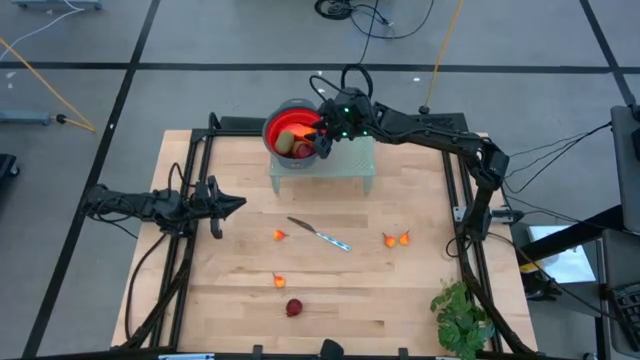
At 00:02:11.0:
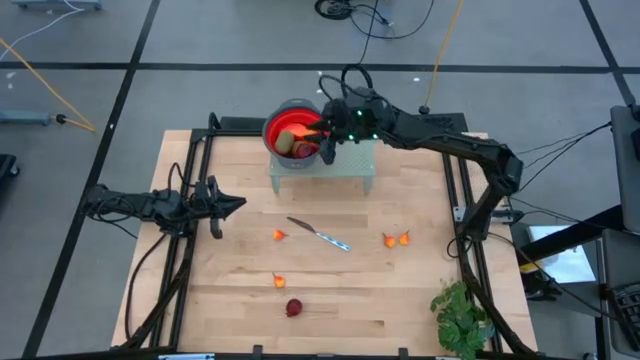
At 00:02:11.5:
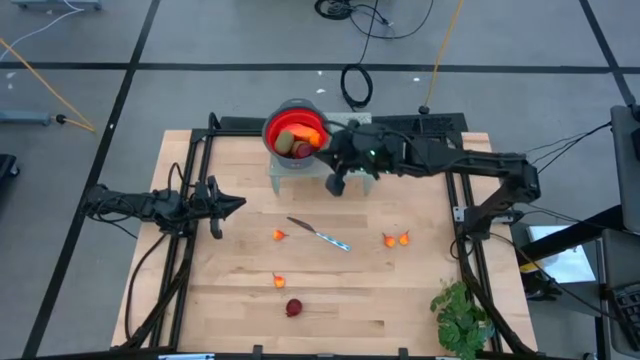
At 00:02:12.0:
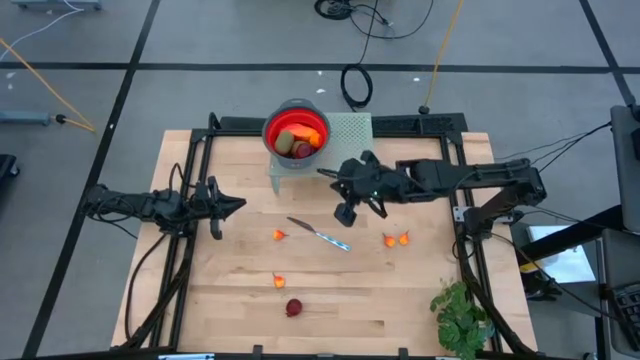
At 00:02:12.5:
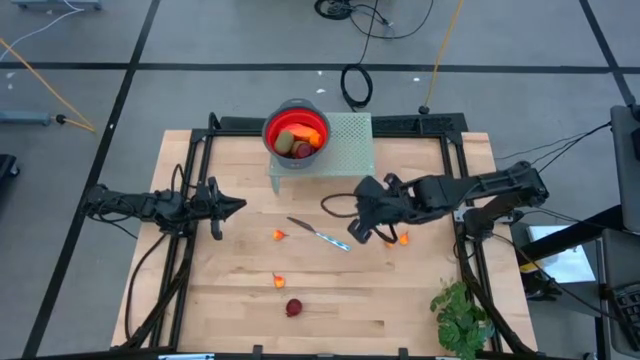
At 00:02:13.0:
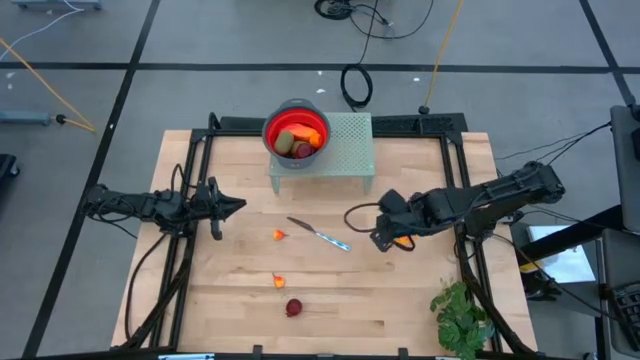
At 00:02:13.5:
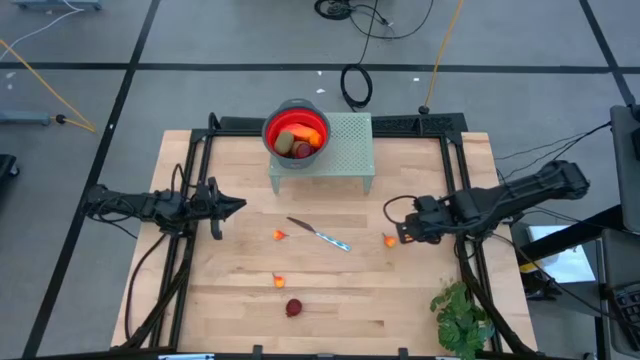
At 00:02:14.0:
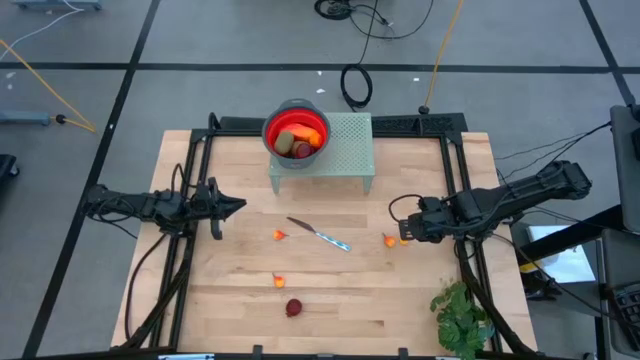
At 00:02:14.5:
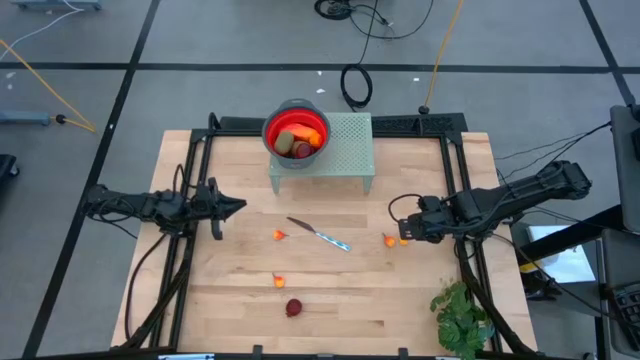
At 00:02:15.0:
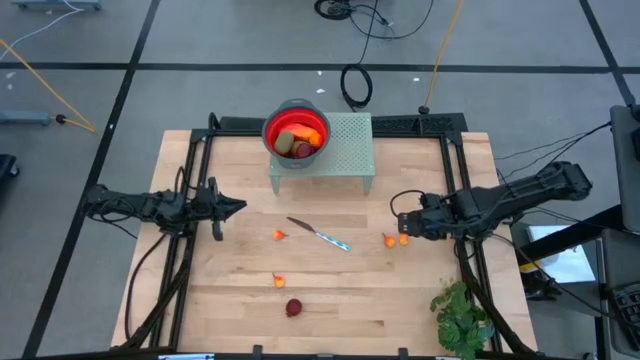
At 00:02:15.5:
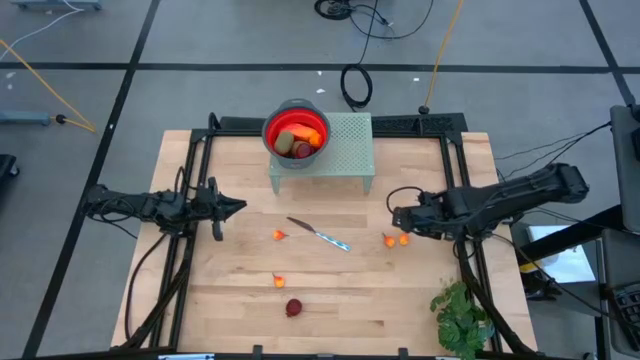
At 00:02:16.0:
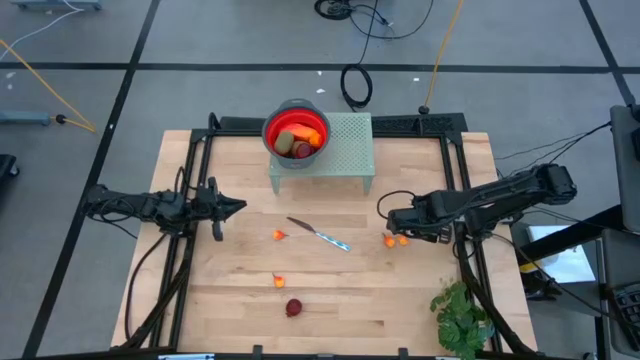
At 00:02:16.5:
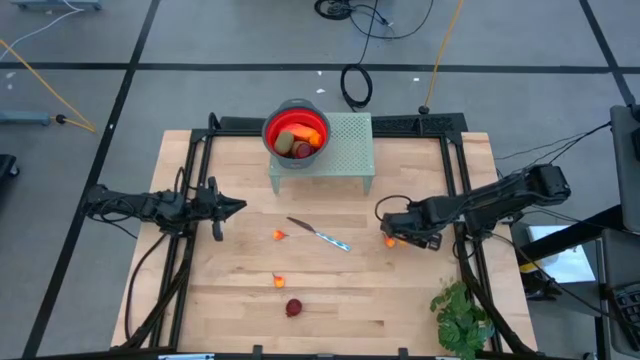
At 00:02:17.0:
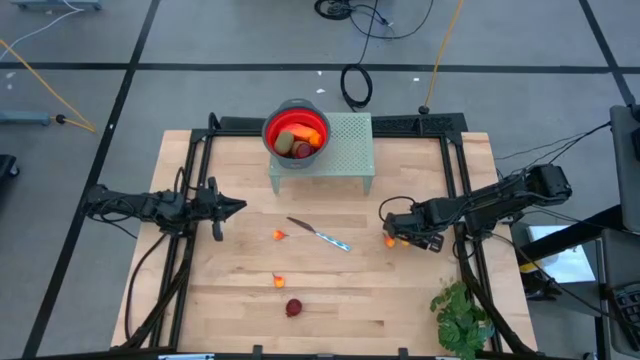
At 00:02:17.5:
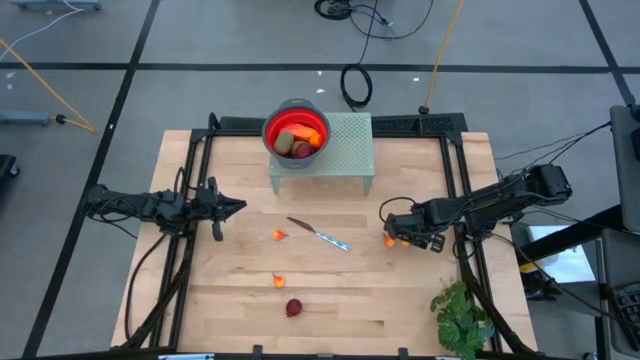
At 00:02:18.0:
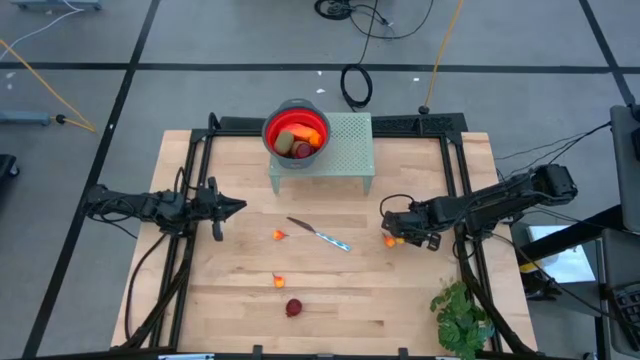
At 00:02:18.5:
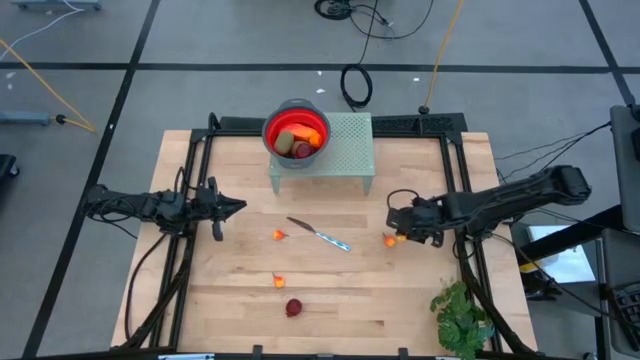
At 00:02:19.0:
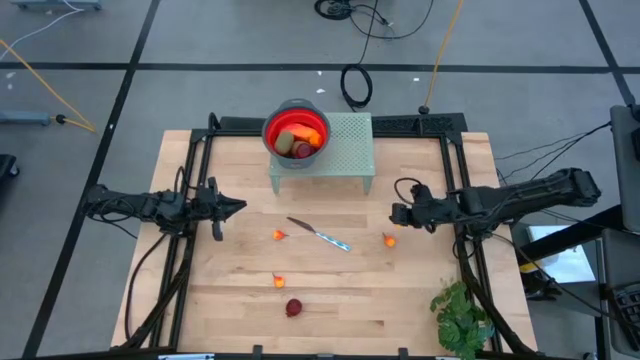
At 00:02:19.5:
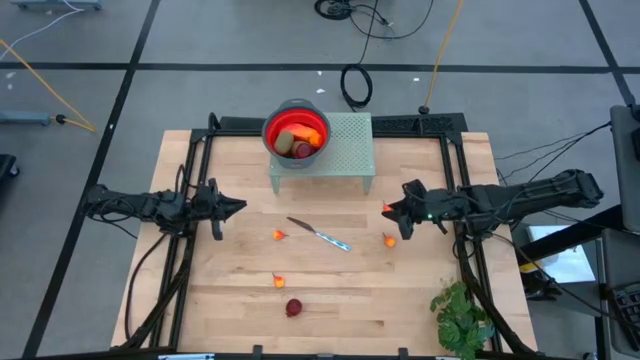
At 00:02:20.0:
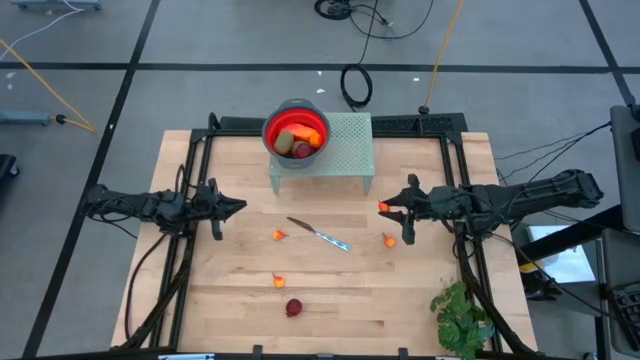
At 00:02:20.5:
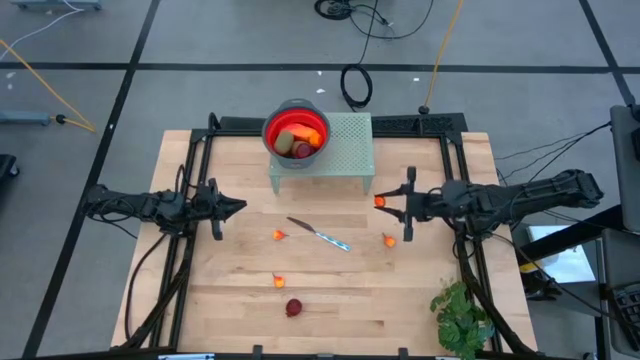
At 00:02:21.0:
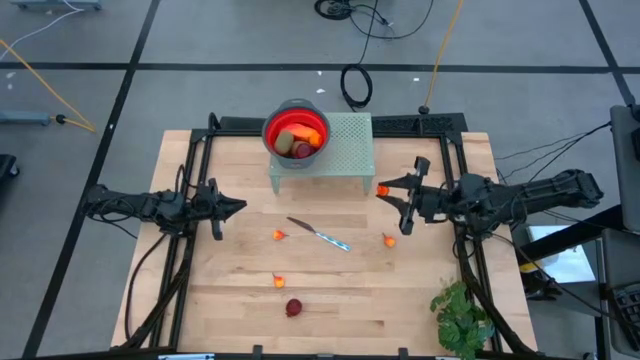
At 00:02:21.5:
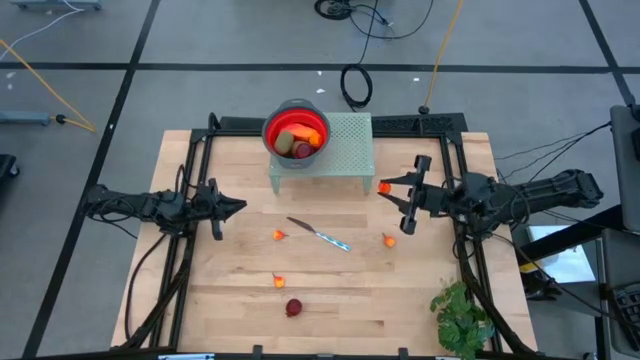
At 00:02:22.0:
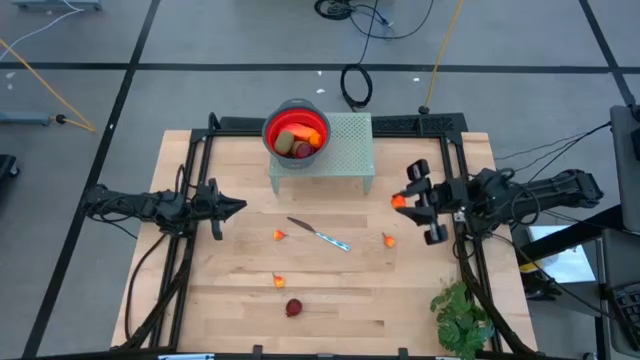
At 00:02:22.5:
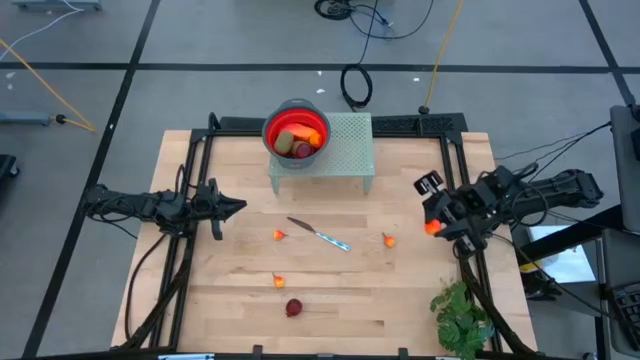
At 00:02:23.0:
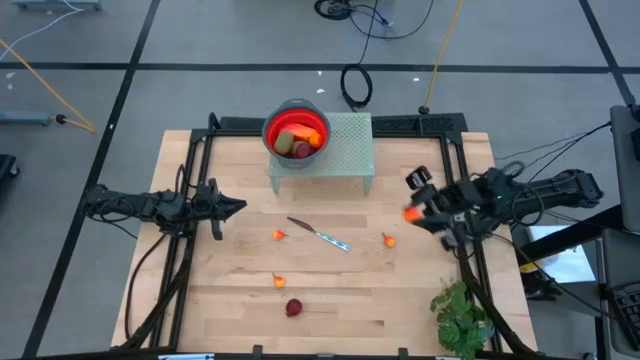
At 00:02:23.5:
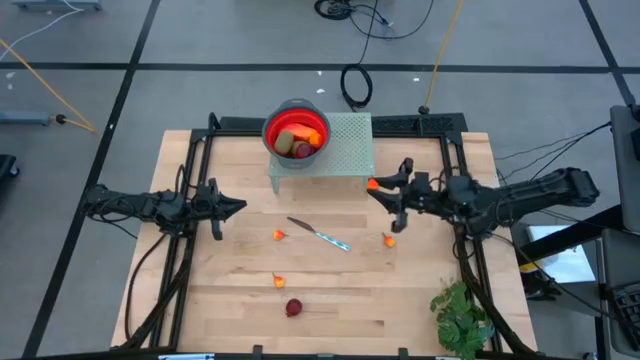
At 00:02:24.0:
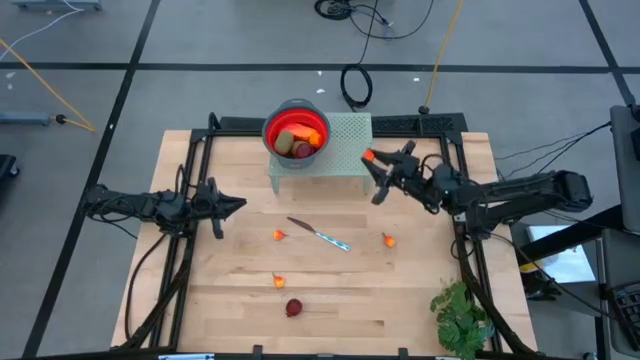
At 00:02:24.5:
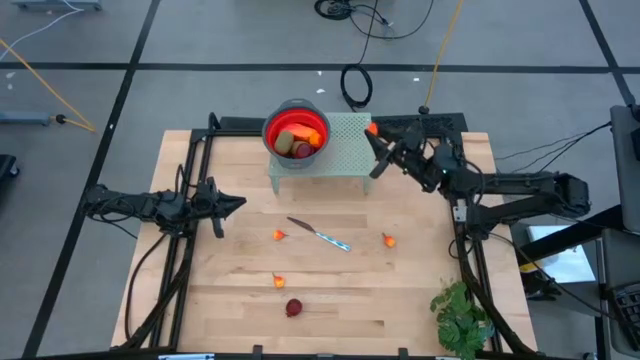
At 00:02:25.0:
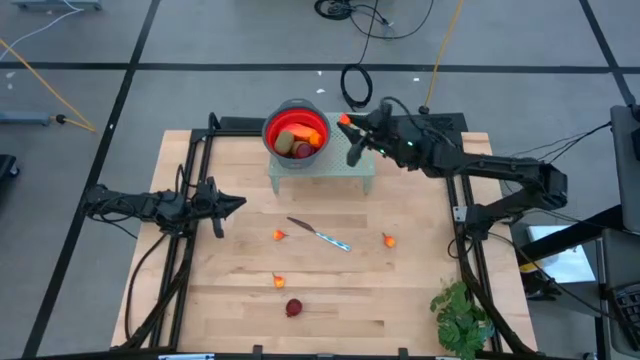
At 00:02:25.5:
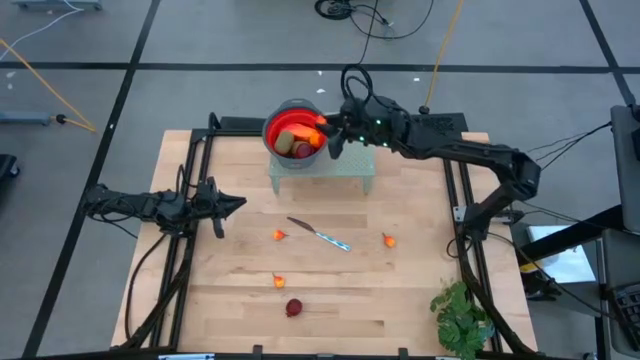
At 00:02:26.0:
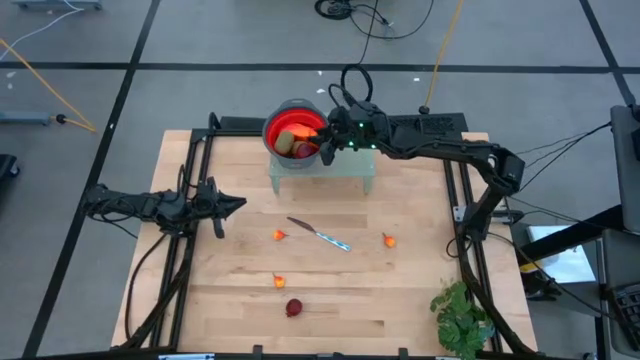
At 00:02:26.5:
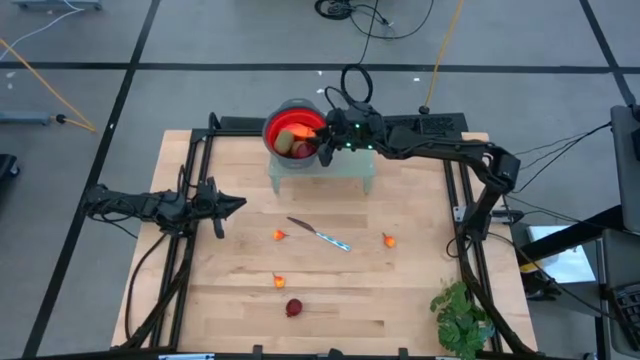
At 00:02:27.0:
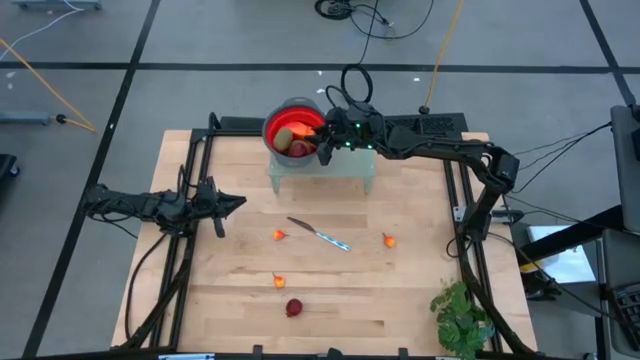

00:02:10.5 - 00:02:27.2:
Task: Pick & Place Fruit
Put the peach into the red strainer bowl

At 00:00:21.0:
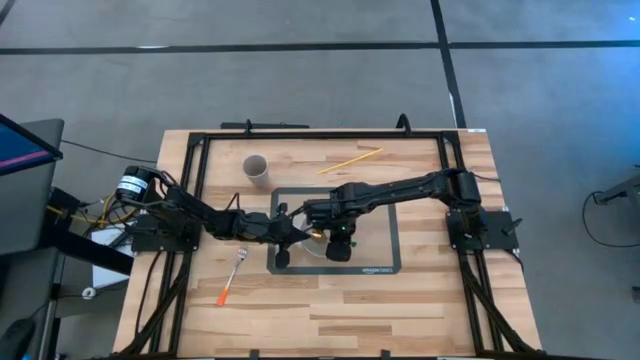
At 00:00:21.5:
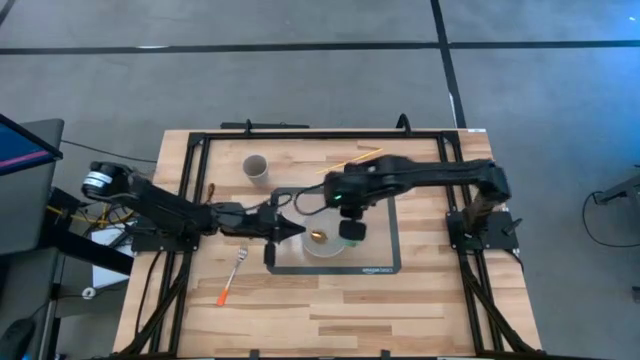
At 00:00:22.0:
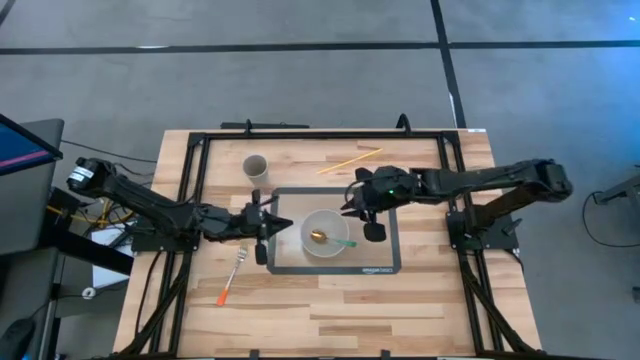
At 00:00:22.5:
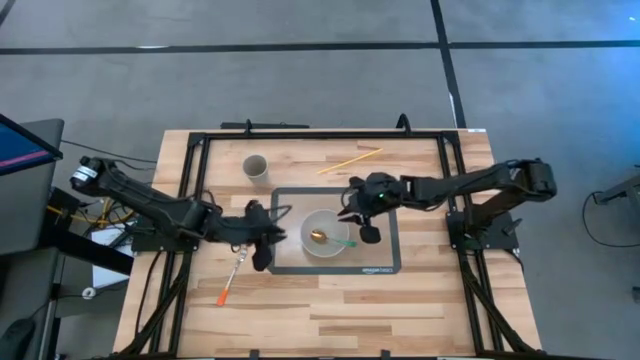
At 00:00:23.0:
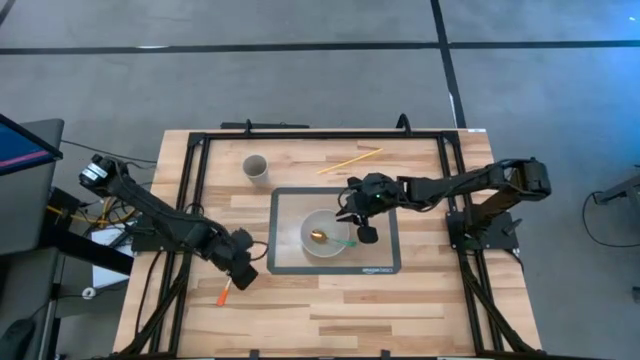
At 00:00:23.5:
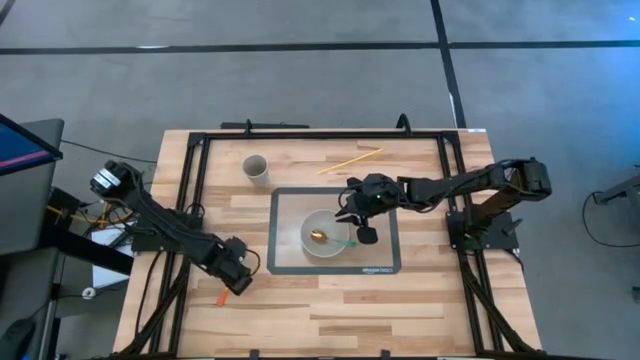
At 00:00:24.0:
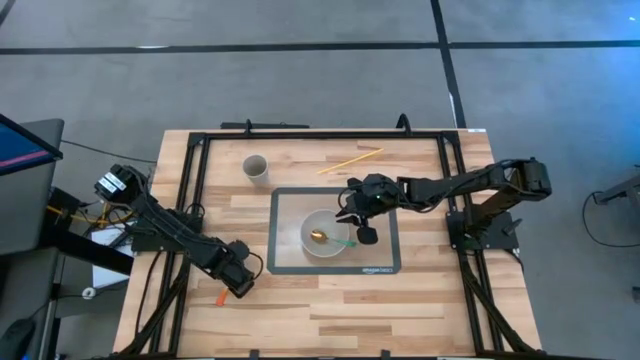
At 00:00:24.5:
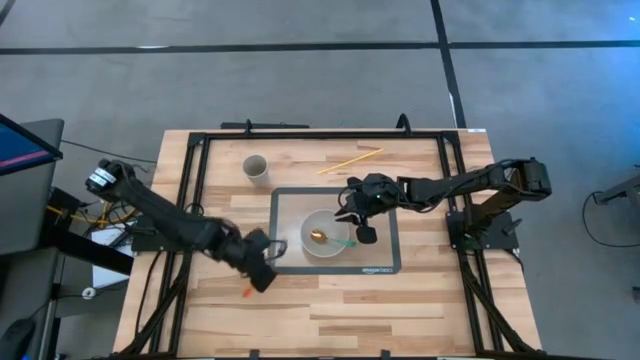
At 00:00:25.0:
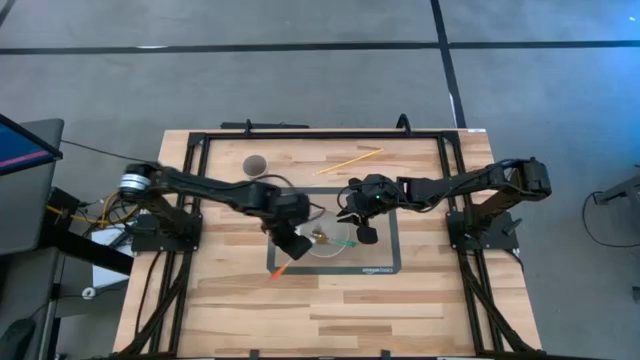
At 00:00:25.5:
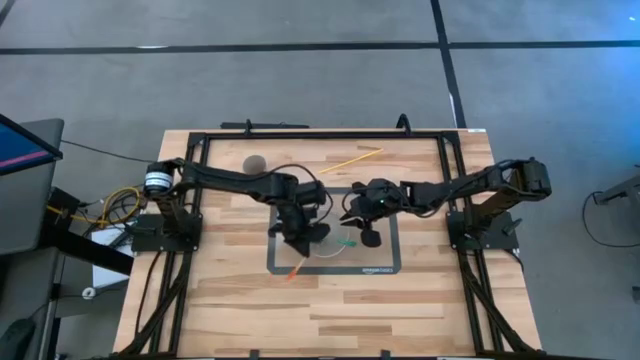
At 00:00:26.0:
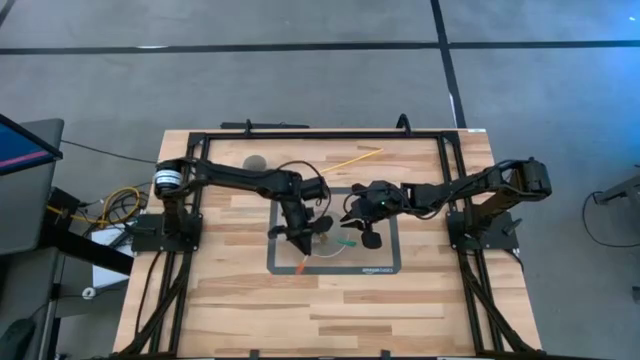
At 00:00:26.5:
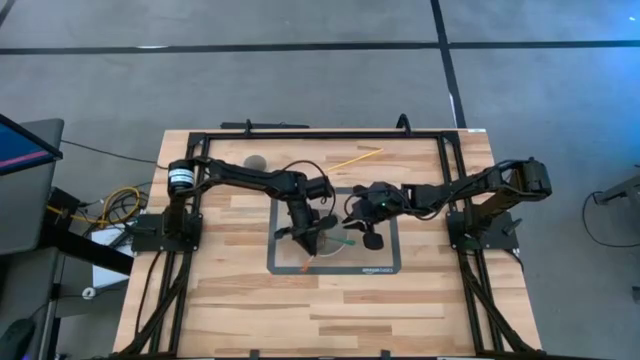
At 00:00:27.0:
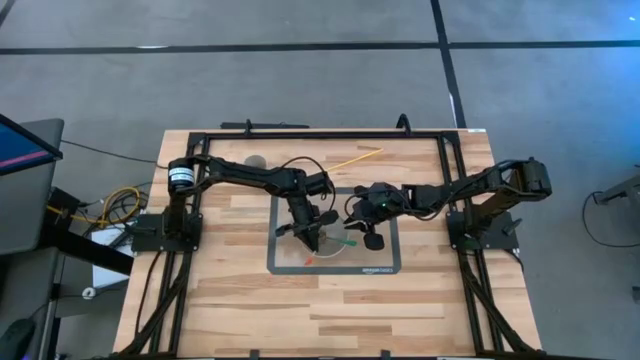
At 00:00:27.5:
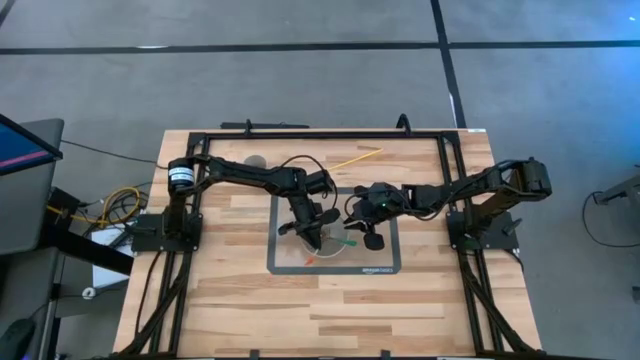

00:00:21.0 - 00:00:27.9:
Task: Pick & Place Utensil
Put the orange fork into the white bowl
